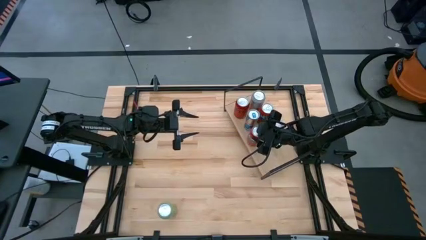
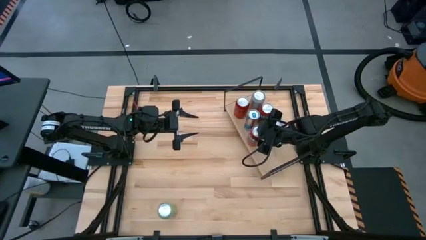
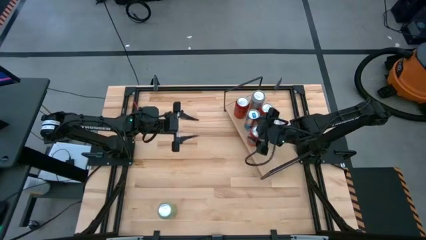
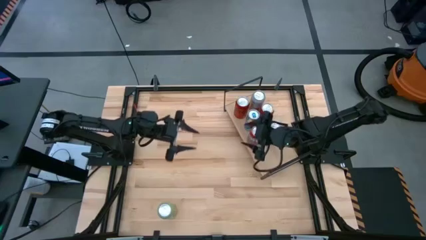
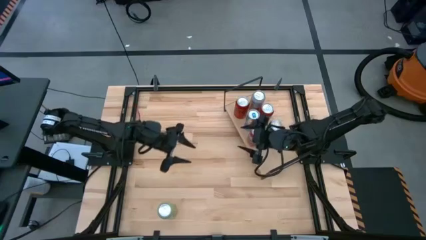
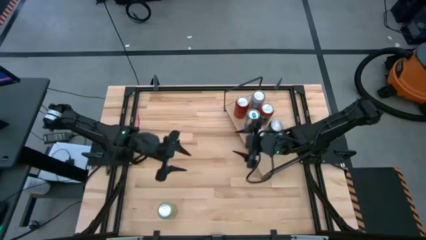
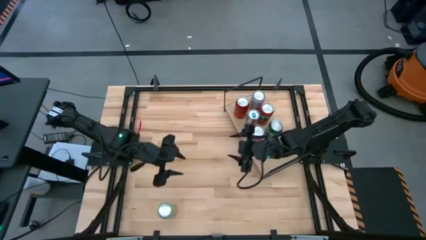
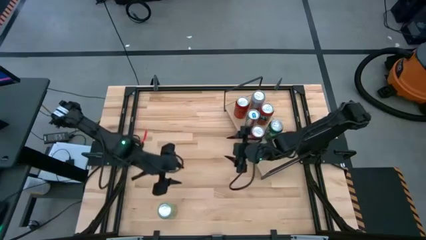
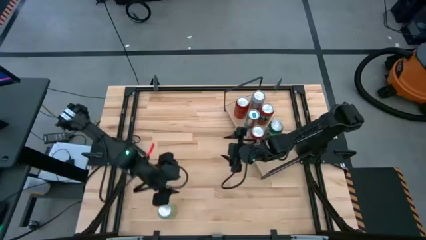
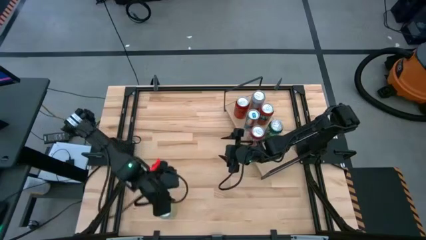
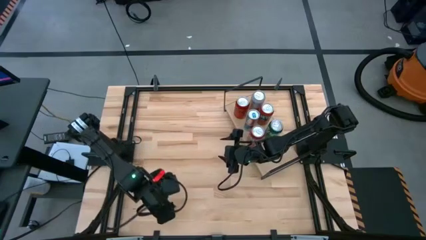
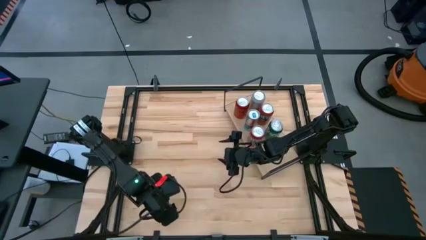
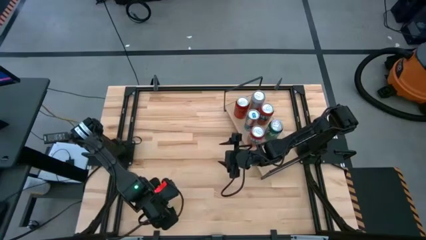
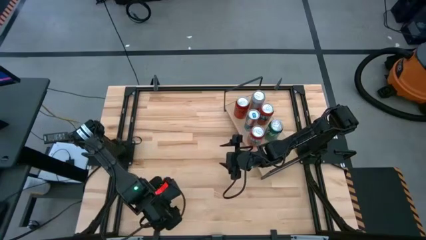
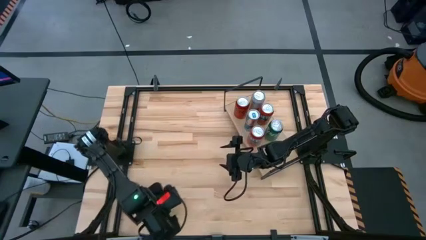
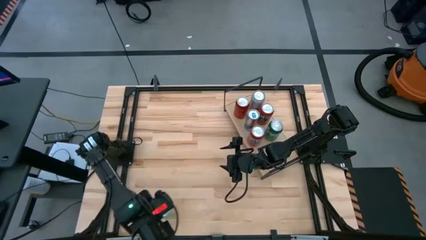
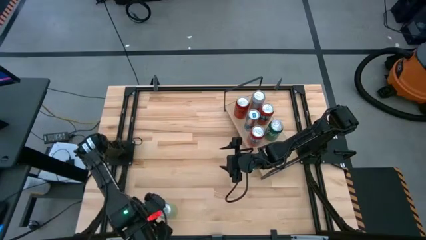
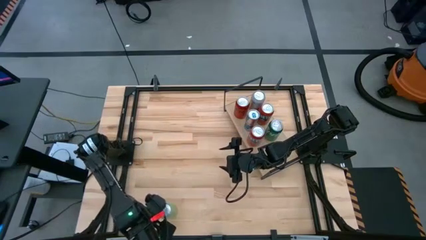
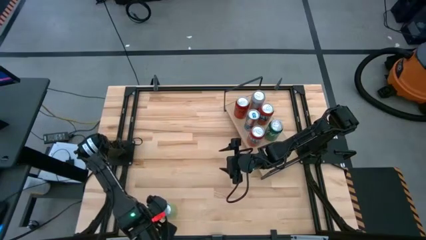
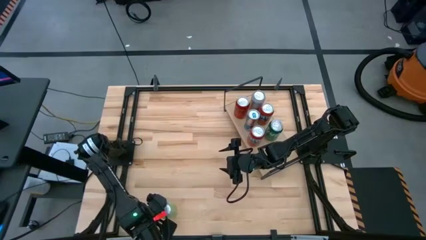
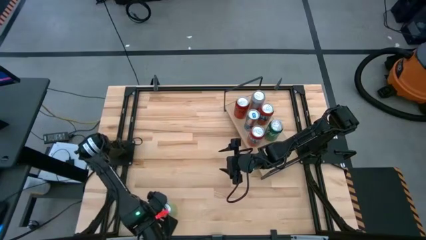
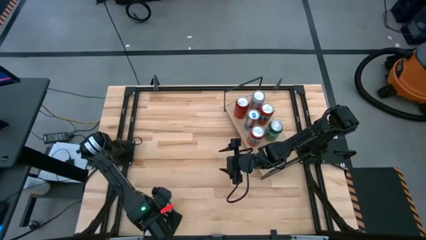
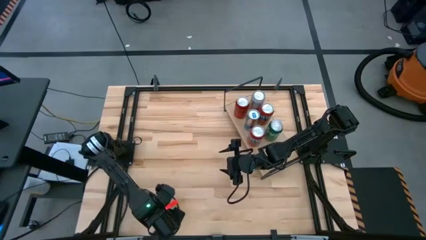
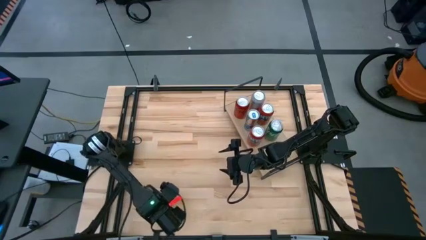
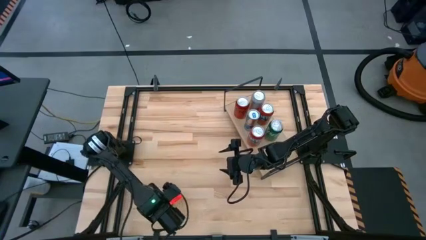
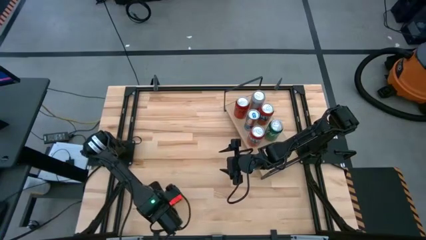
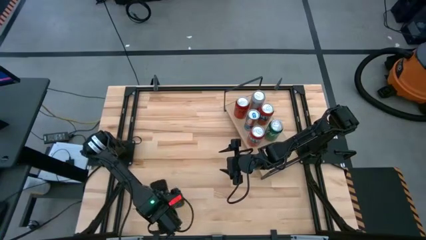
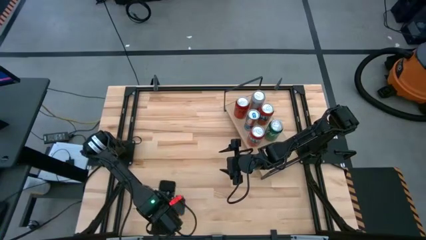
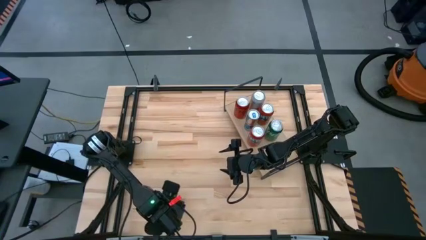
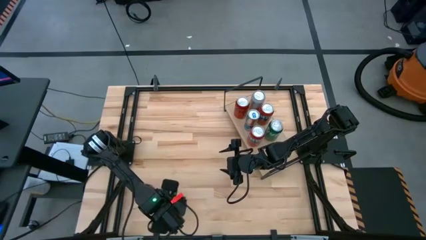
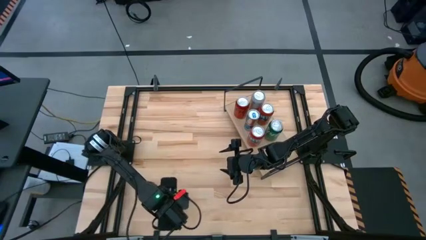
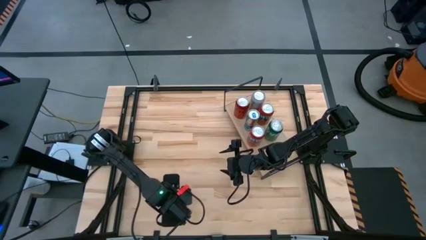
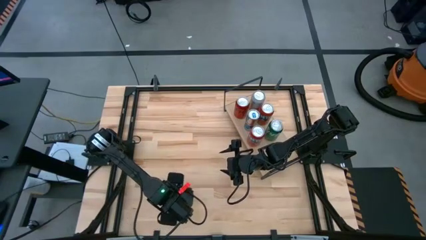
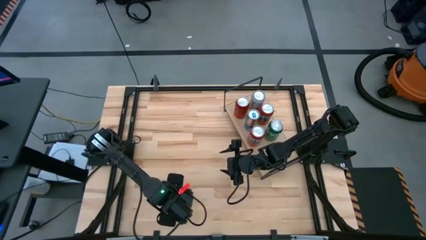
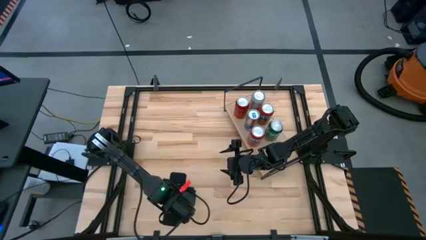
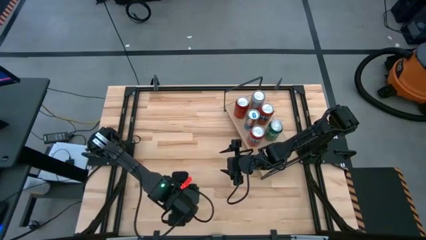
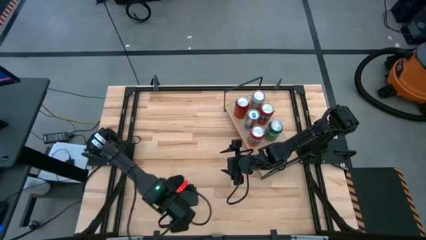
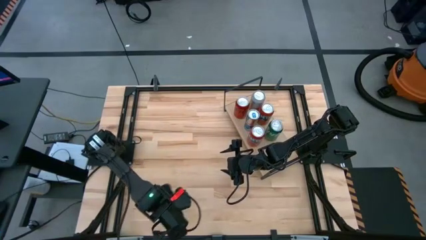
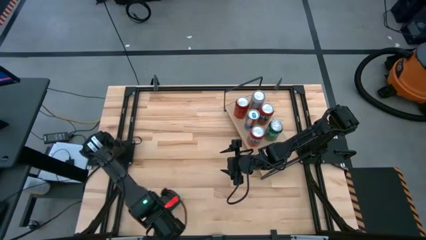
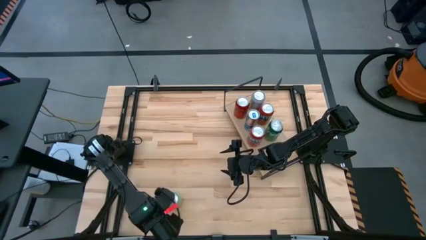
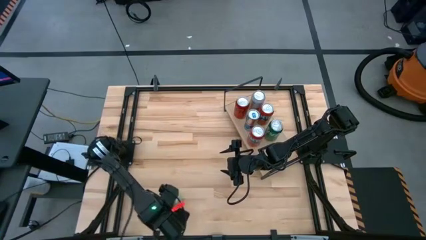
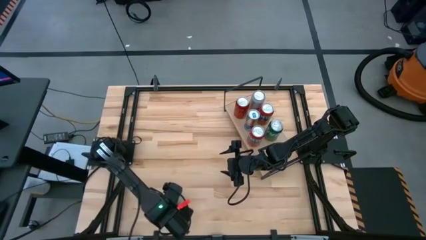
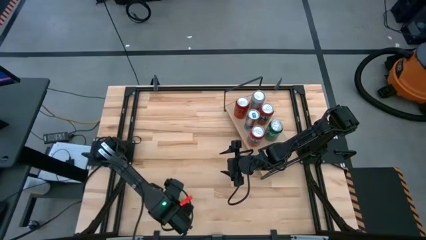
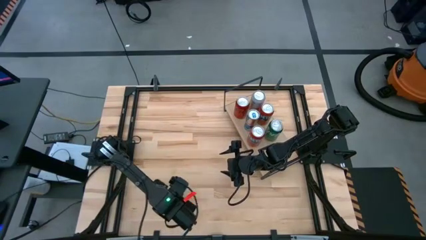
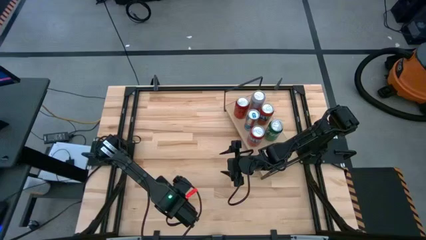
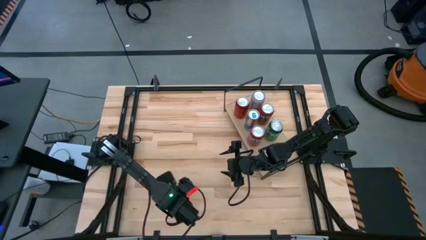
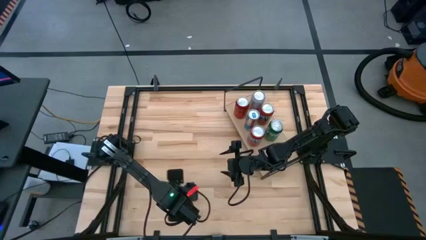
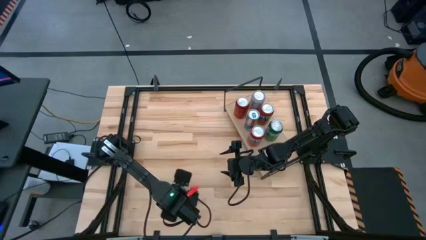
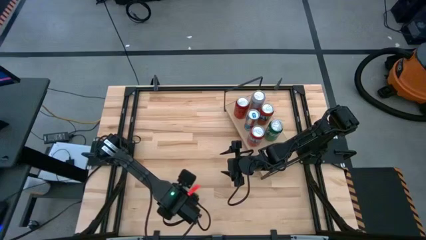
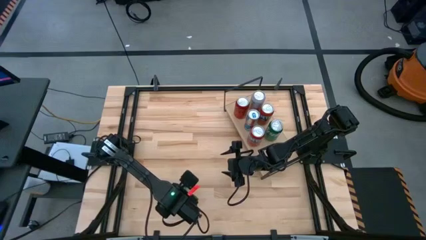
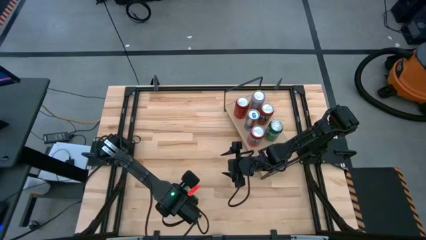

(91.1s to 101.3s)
Task: Place canned beverage on shelf
Put the light green soda can on the shelf

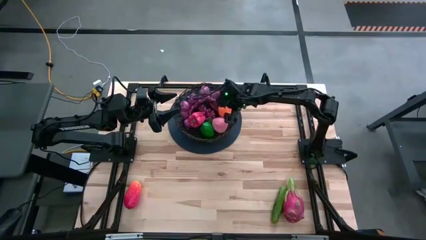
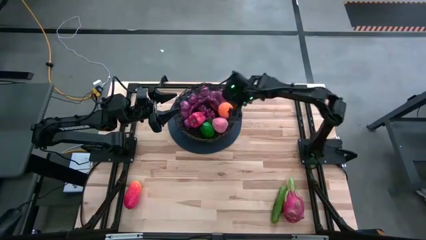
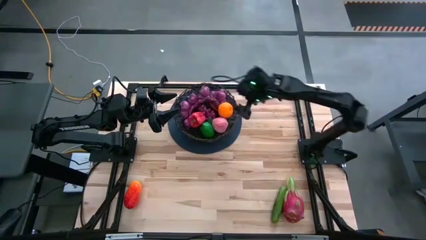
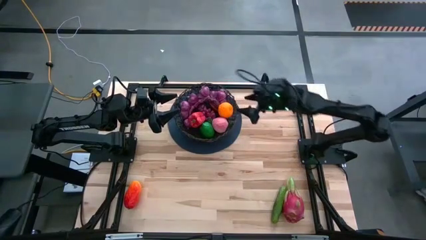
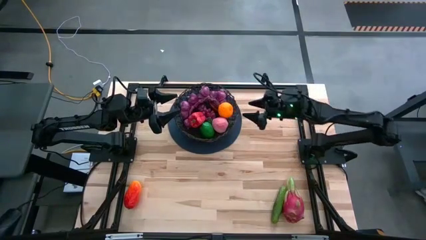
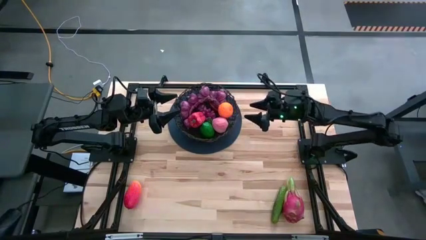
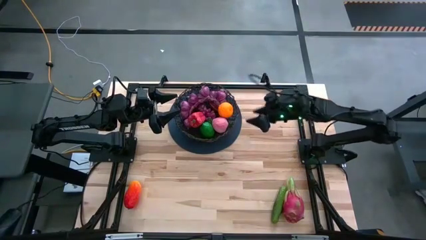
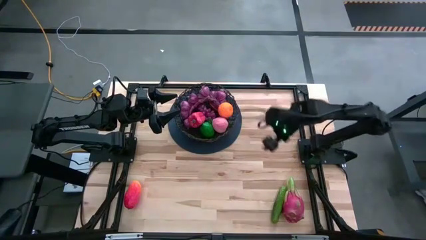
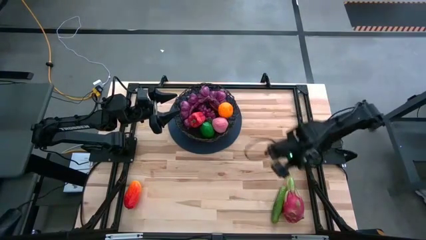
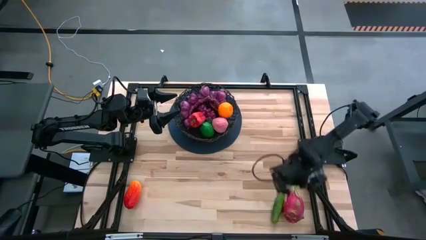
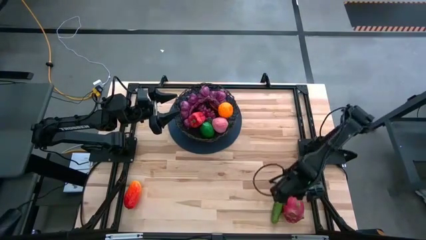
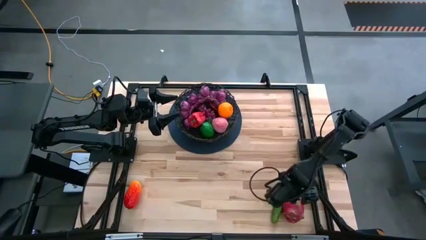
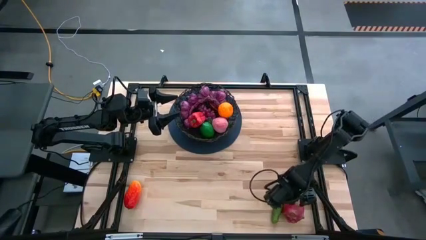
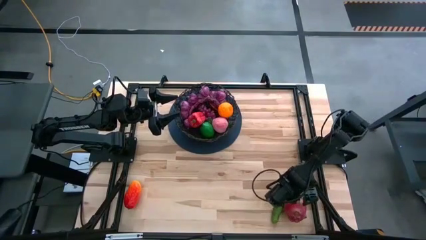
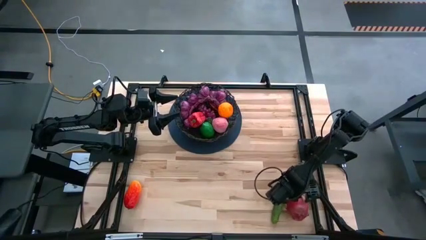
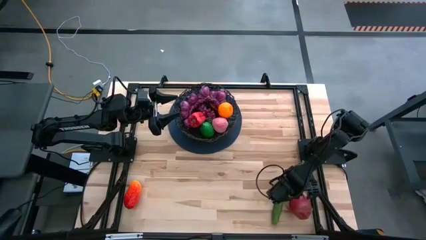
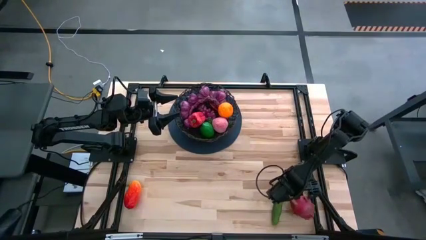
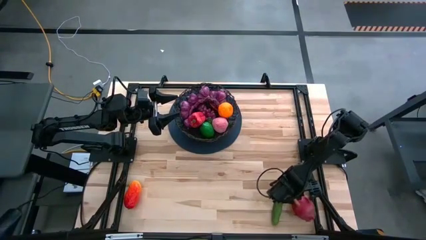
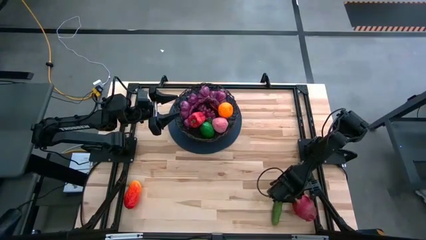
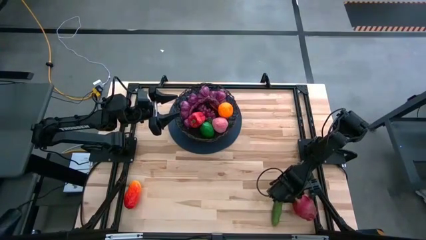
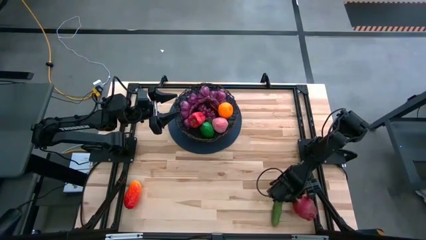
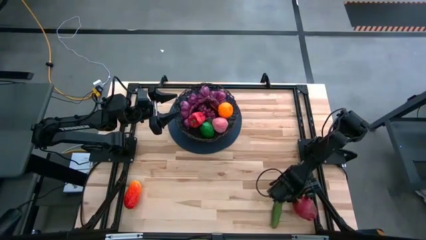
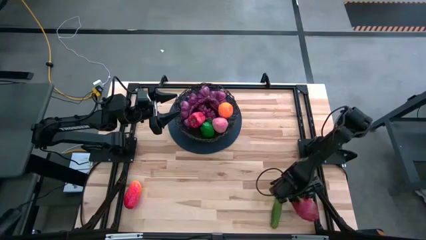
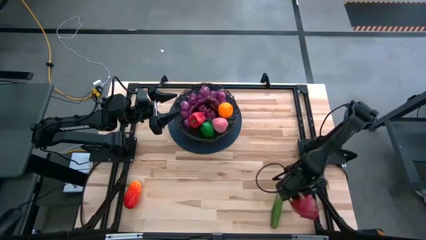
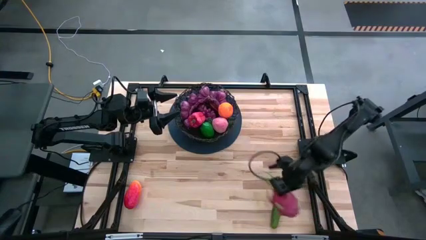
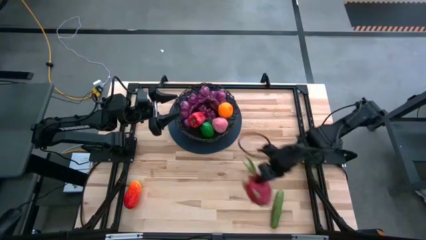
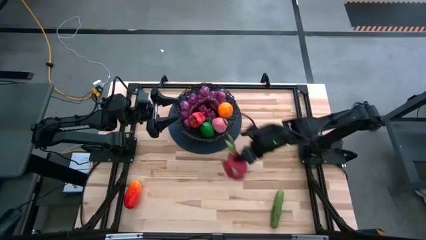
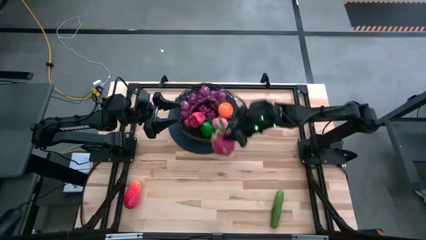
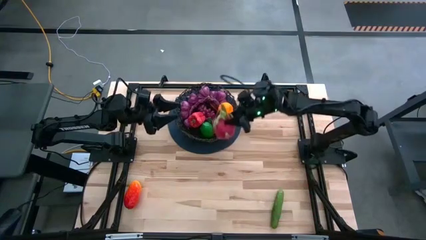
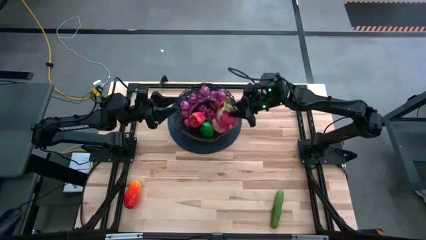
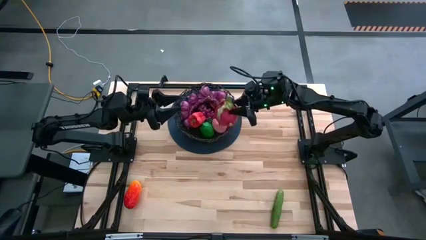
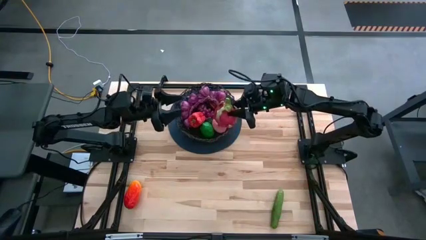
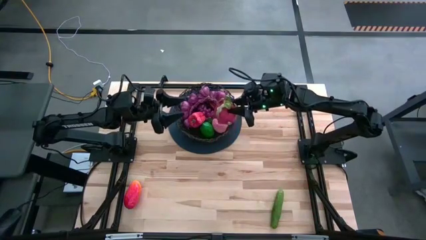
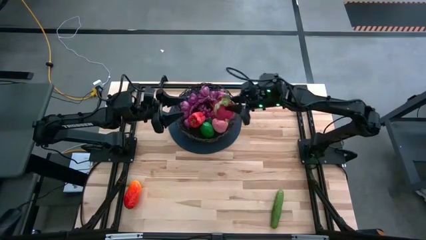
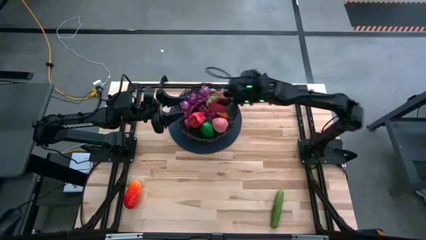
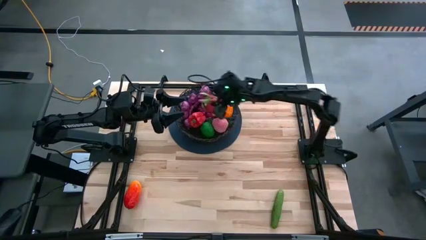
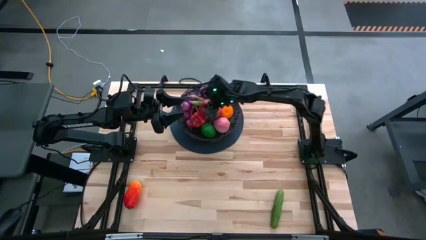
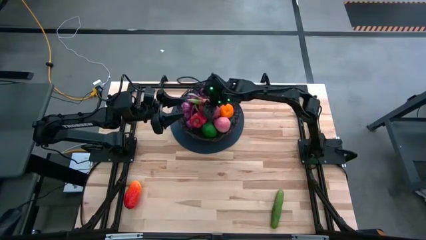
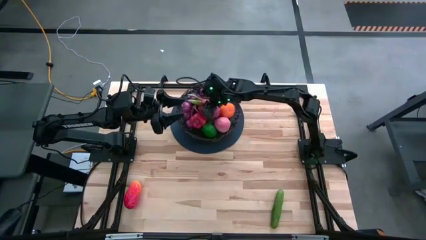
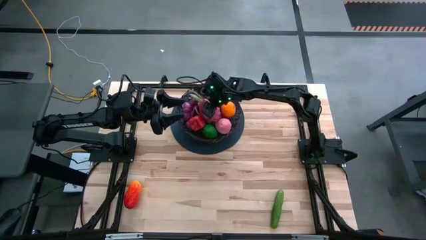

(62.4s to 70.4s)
Task: Build produce basket
Put the dragonfruit into the wire basket
